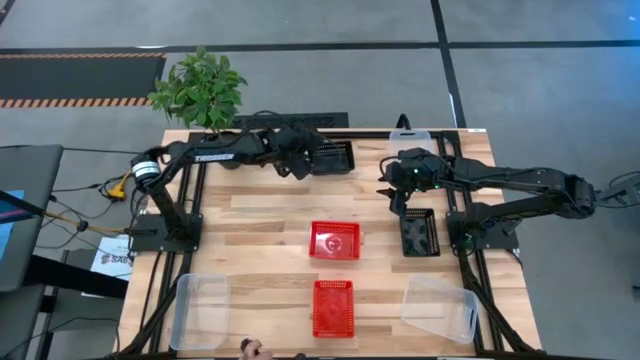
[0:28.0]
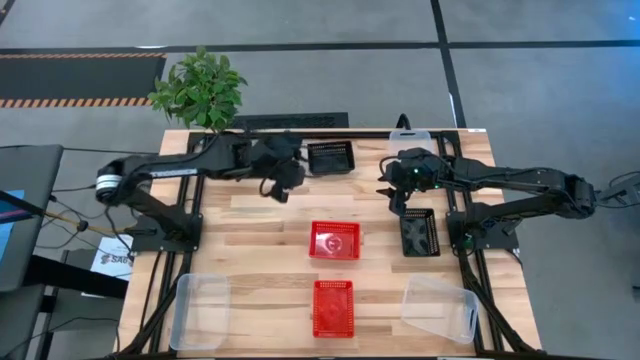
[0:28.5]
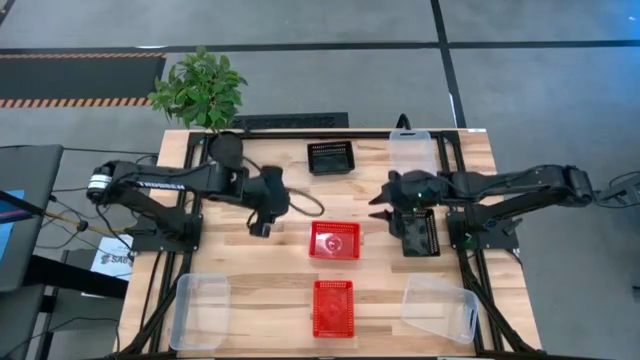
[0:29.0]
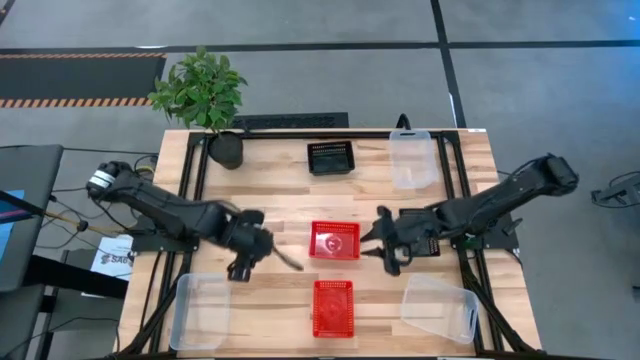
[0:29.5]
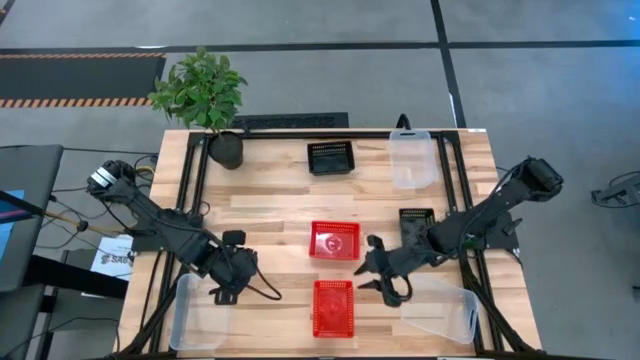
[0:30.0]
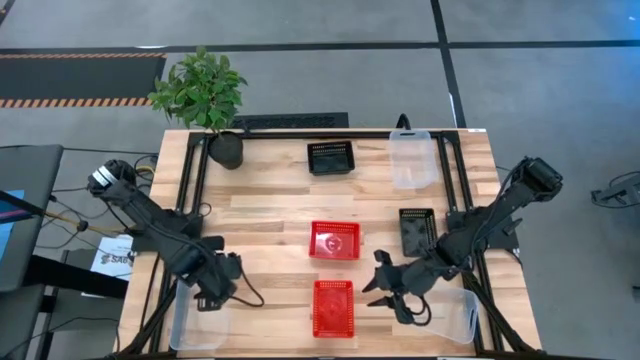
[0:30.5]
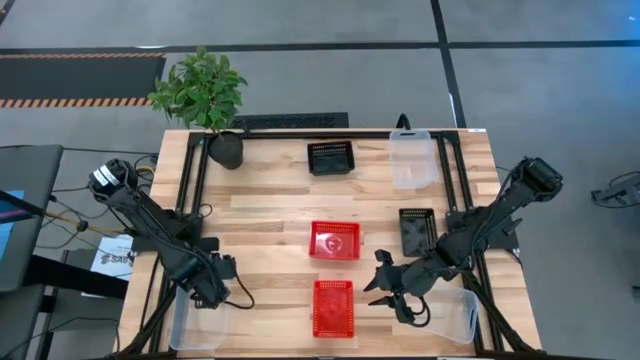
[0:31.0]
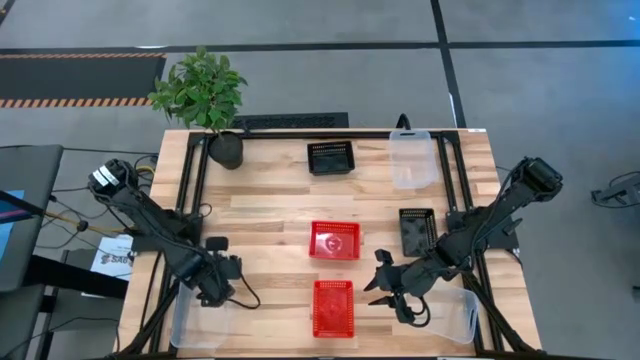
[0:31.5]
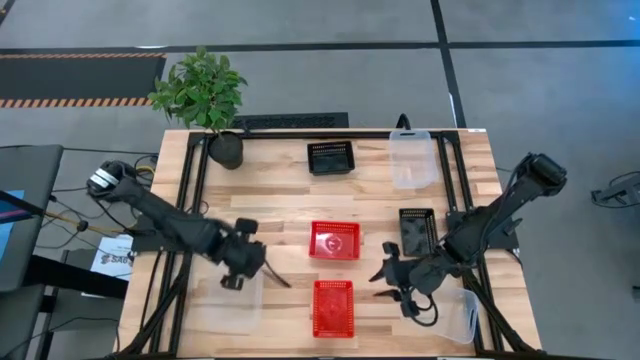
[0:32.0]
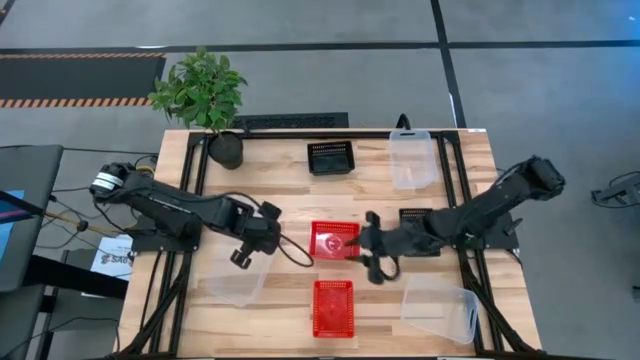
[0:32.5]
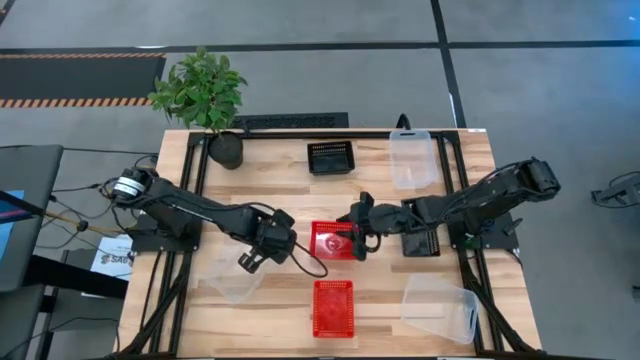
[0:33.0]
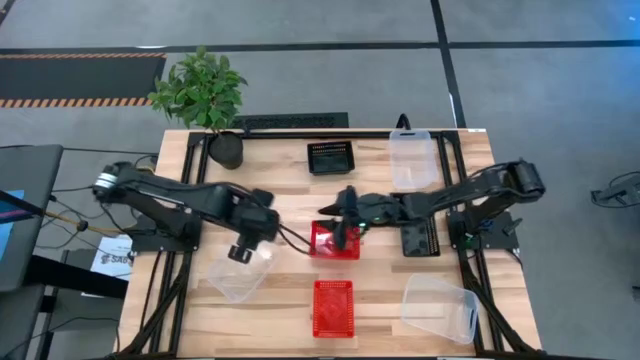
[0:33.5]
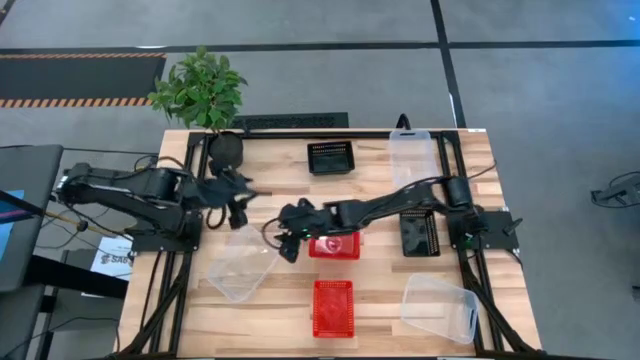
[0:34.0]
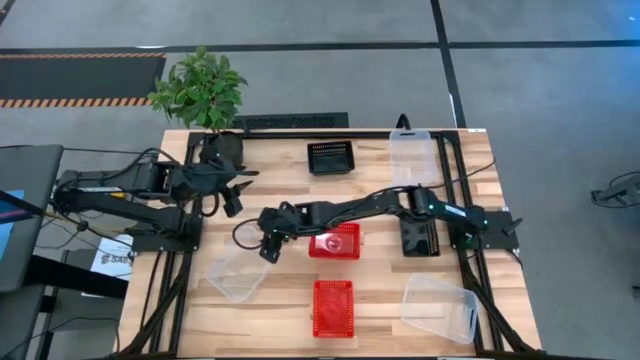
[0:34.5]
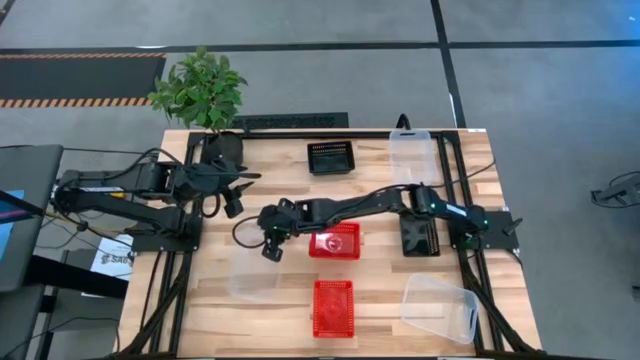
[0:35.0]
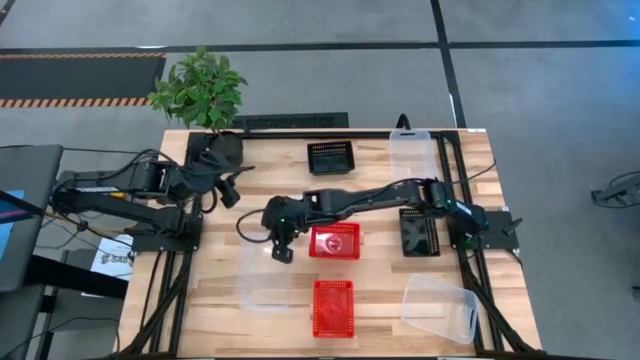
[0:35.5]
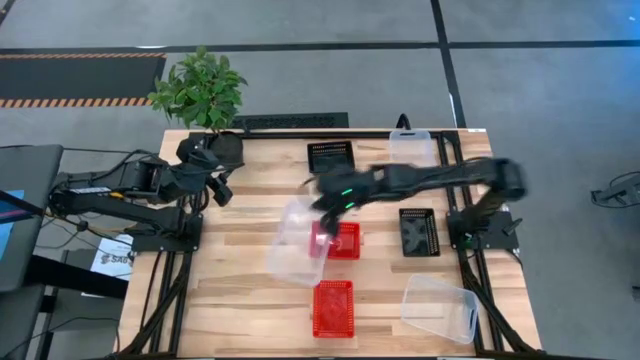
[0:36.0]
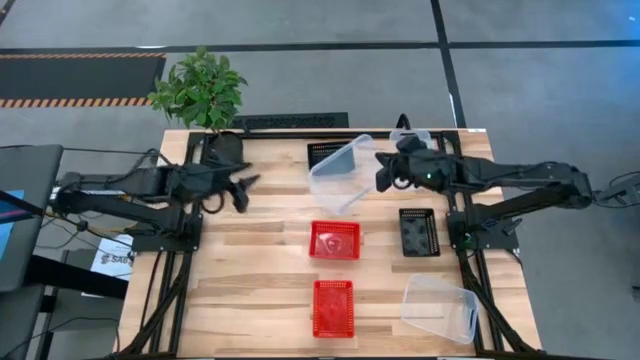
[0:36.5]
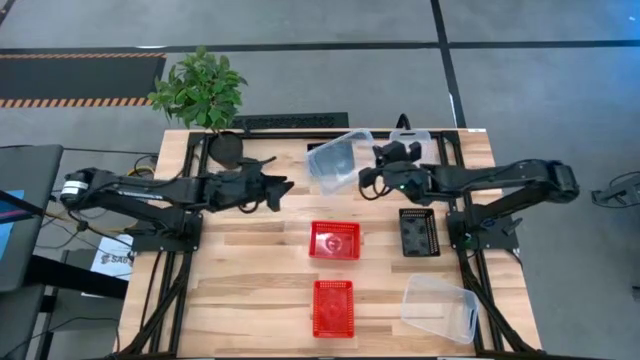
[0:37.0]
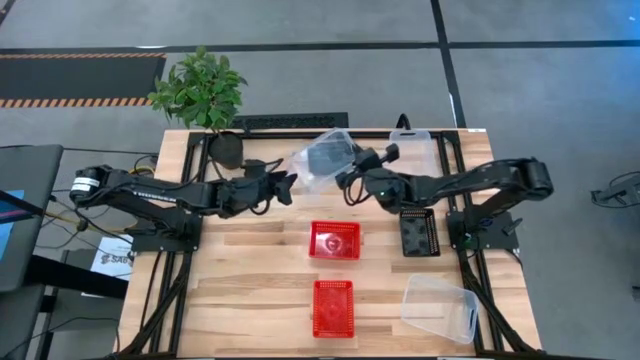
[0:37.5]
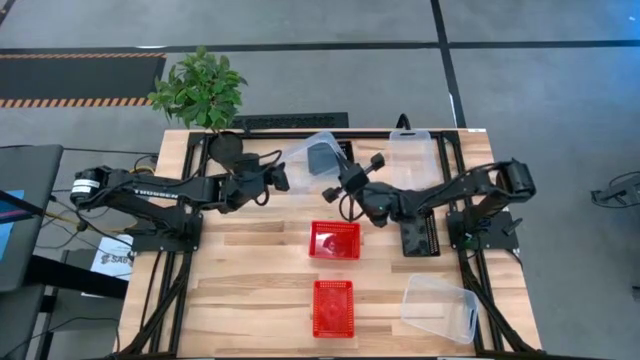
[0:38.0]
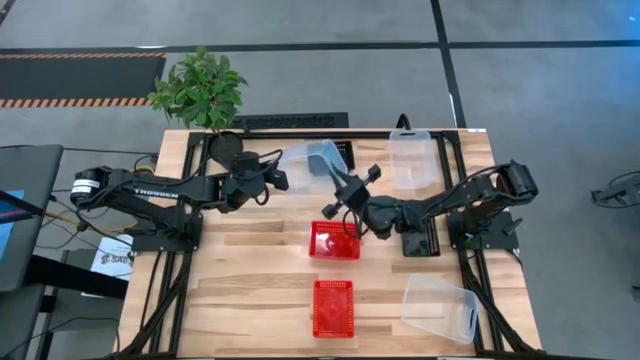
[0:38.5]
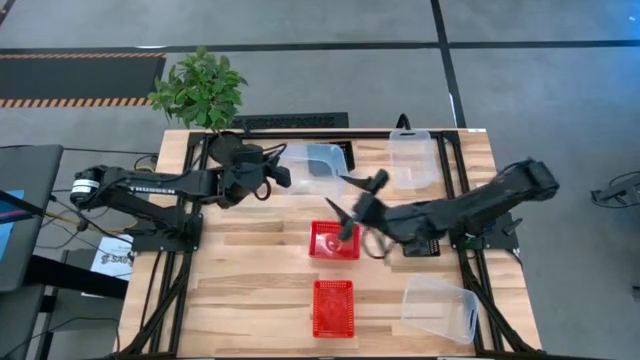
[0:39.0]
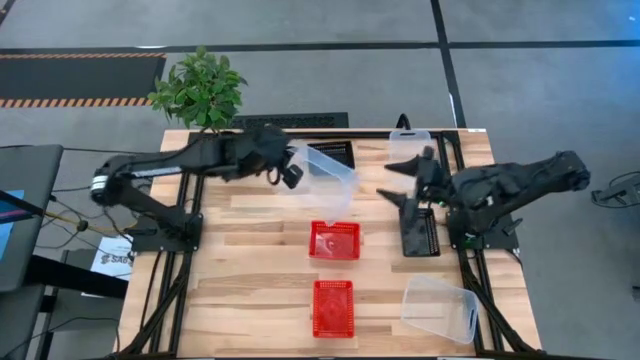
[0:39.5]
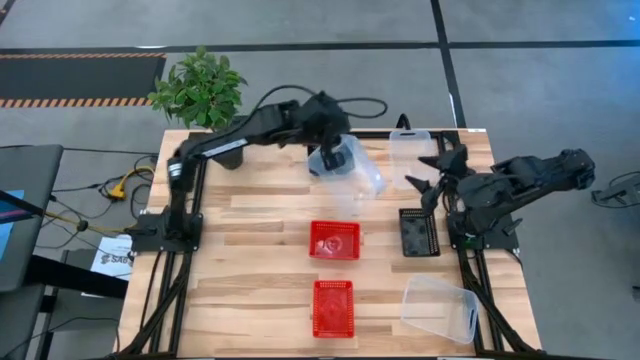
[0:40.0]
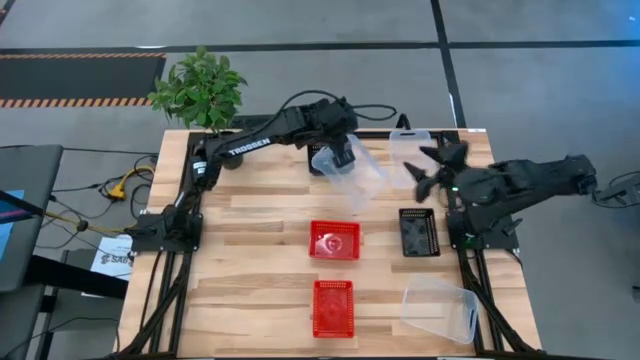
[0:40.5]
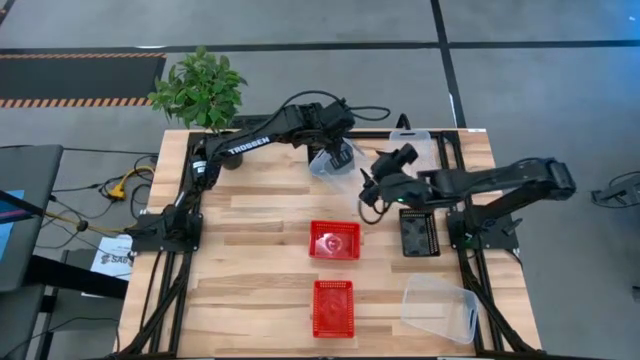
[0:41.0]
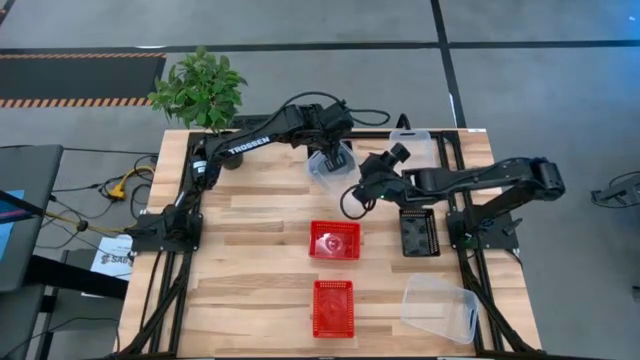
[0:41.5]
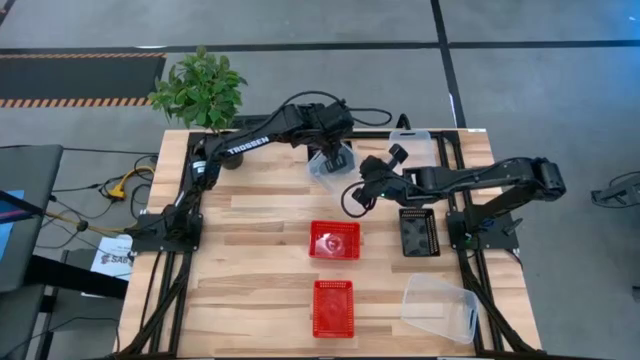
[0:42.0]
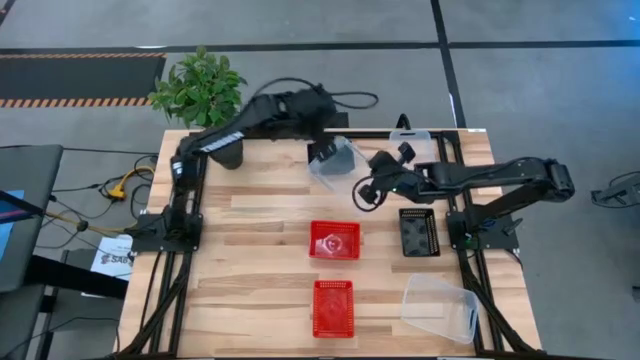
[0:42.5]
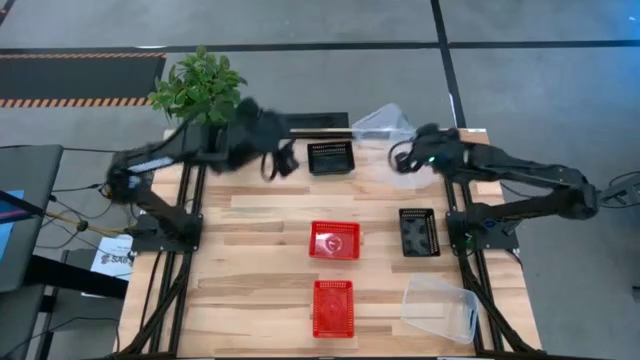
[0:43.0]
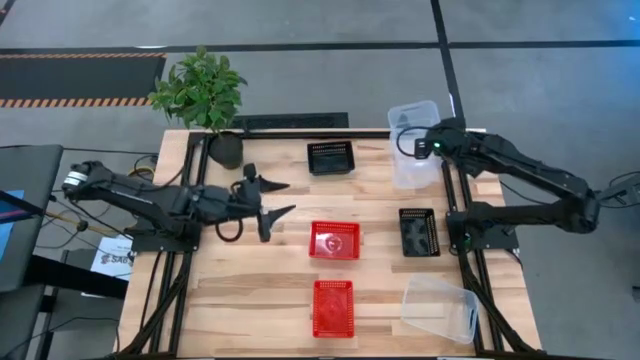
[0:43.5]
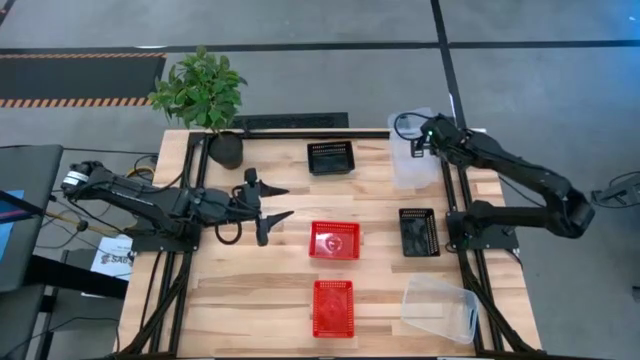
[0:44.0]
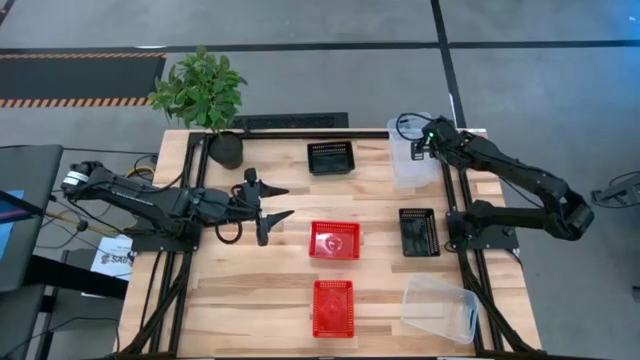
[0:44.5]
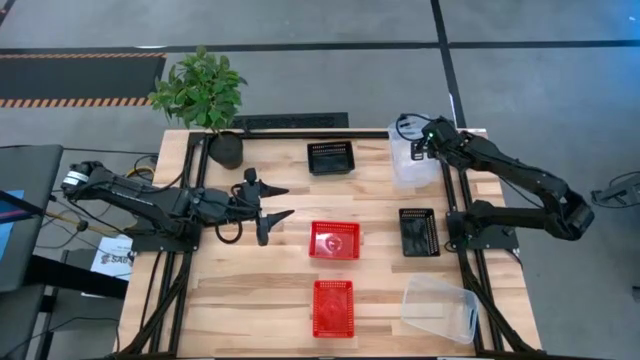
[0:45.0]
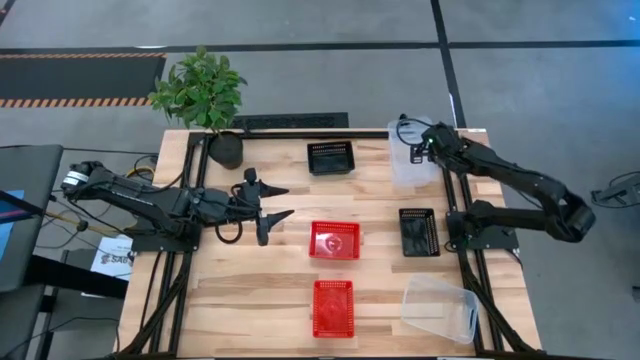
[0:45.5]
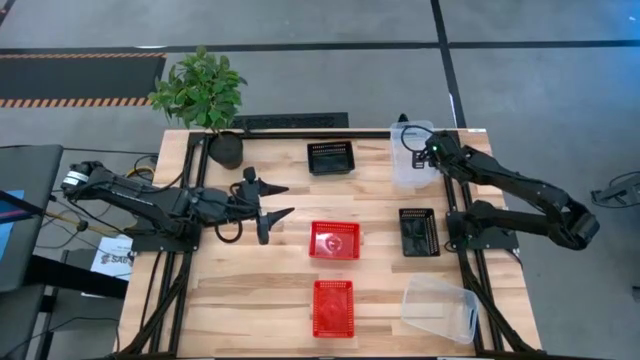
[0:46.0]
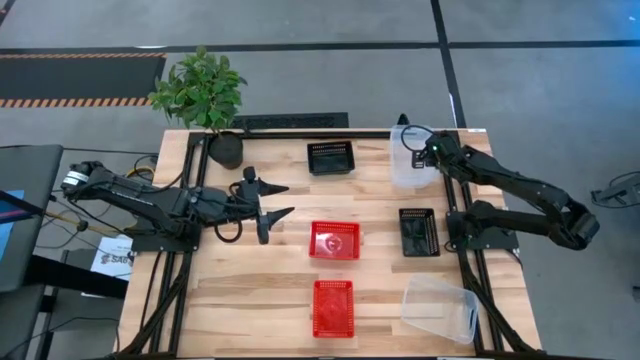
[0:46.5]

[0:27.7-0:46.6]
Stack the bottom left transparent bin on top of the top transparent bin
